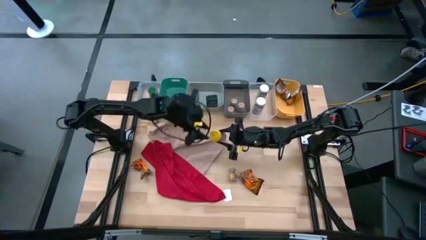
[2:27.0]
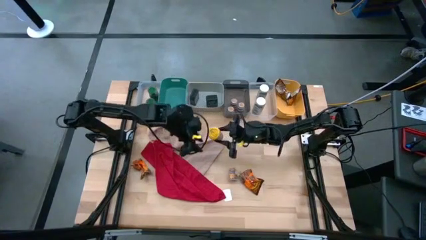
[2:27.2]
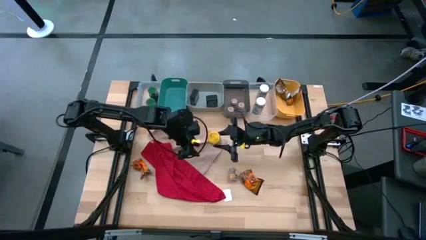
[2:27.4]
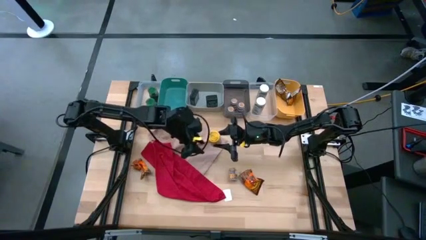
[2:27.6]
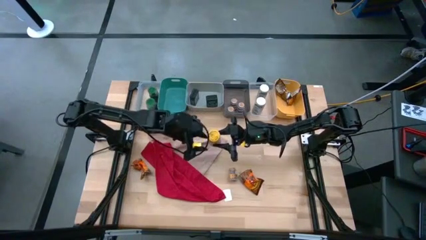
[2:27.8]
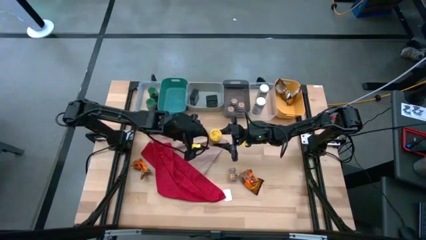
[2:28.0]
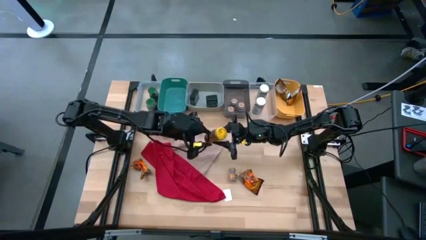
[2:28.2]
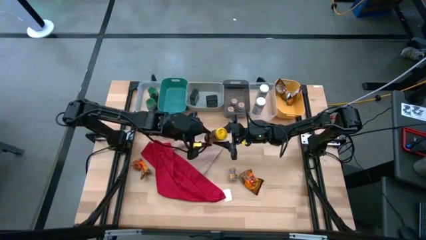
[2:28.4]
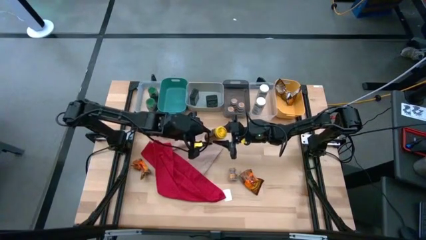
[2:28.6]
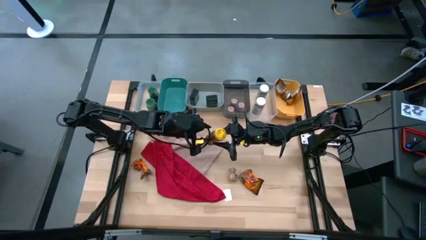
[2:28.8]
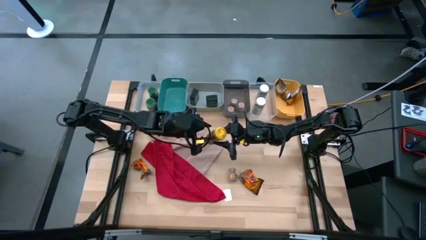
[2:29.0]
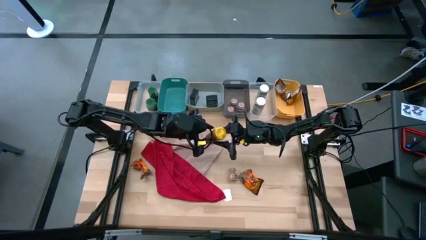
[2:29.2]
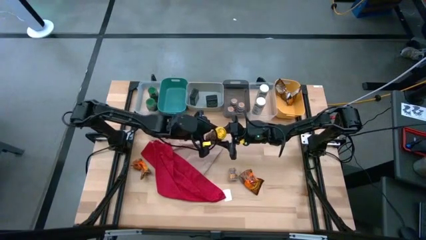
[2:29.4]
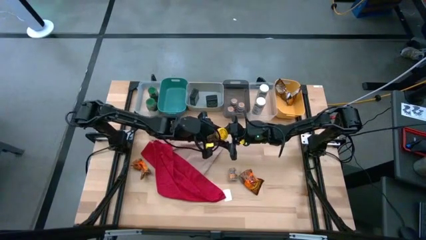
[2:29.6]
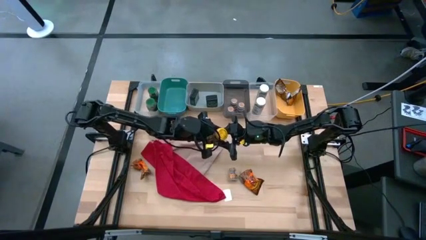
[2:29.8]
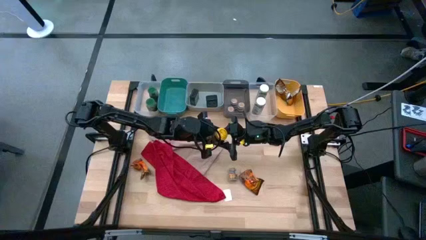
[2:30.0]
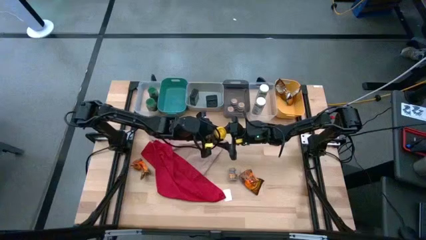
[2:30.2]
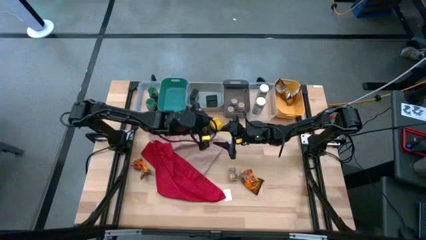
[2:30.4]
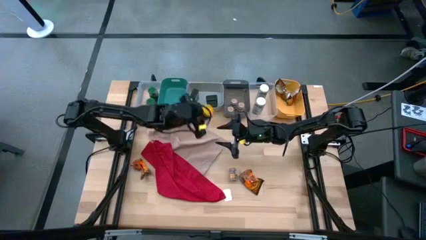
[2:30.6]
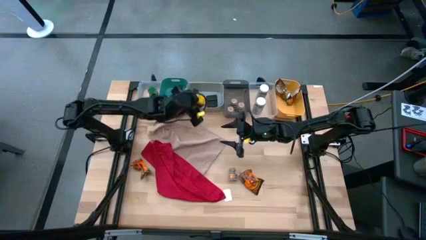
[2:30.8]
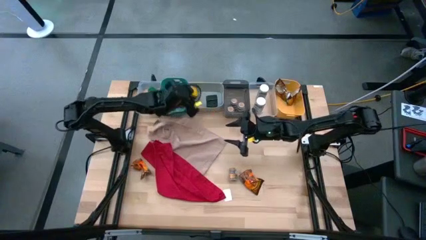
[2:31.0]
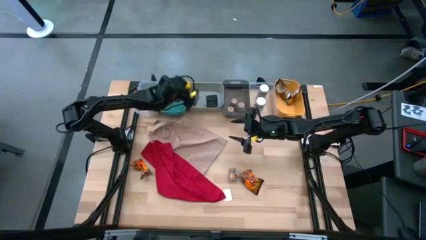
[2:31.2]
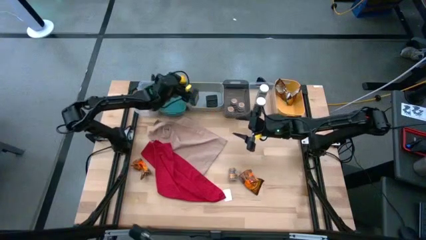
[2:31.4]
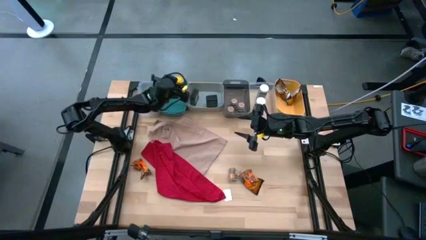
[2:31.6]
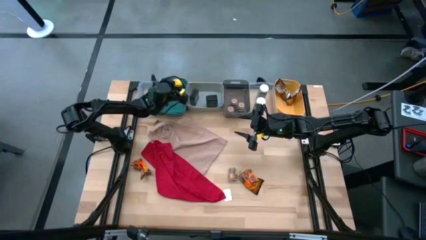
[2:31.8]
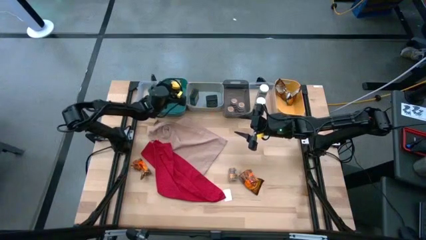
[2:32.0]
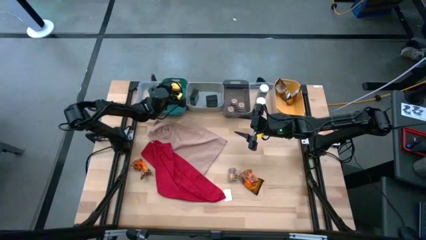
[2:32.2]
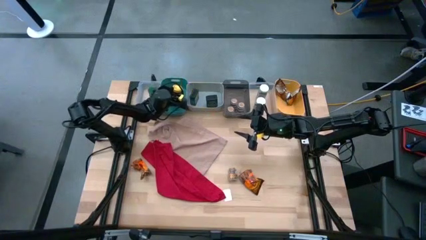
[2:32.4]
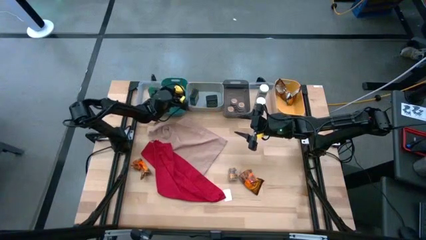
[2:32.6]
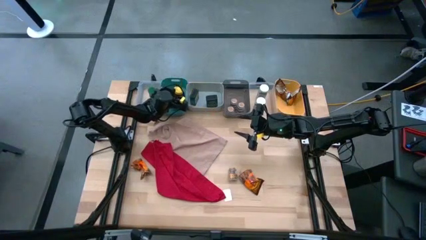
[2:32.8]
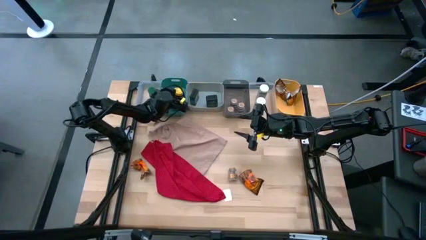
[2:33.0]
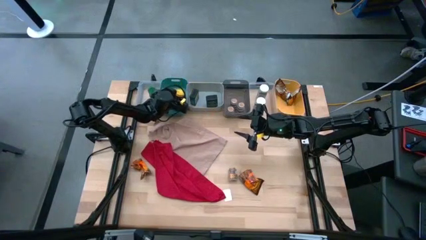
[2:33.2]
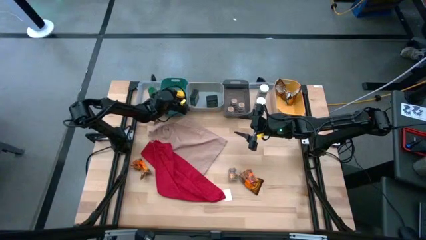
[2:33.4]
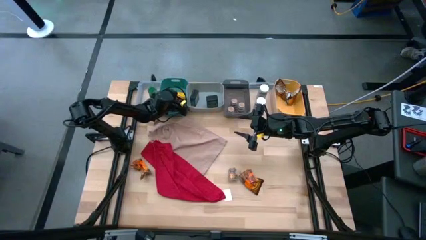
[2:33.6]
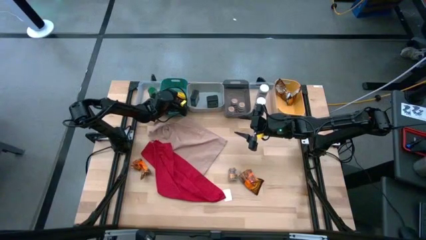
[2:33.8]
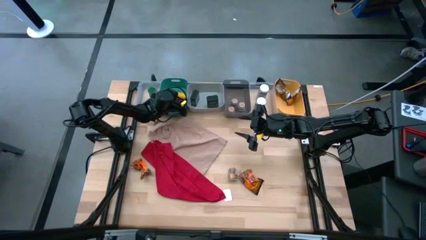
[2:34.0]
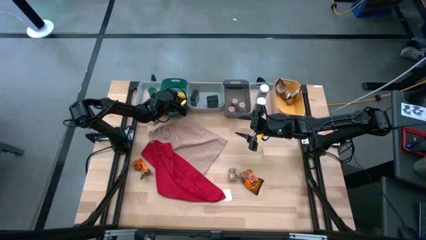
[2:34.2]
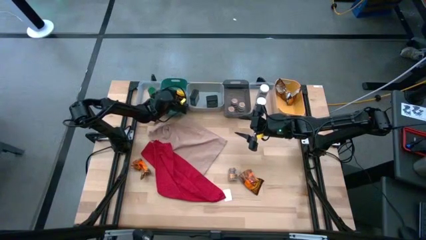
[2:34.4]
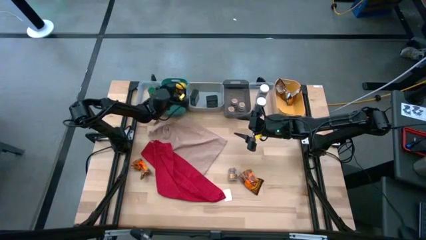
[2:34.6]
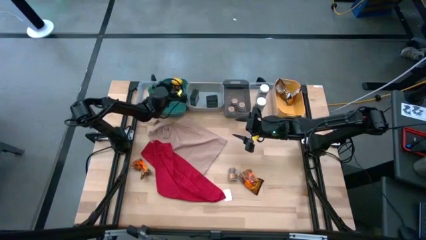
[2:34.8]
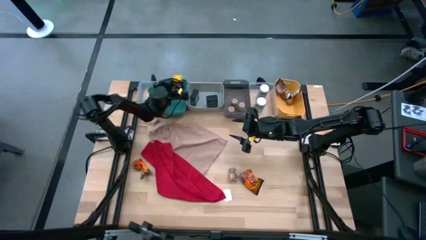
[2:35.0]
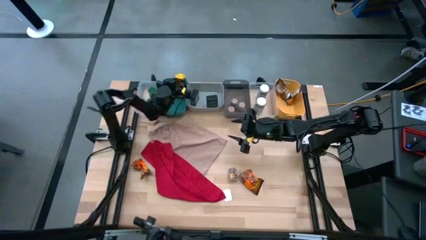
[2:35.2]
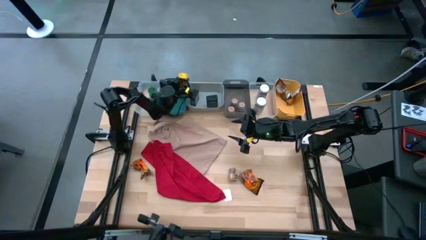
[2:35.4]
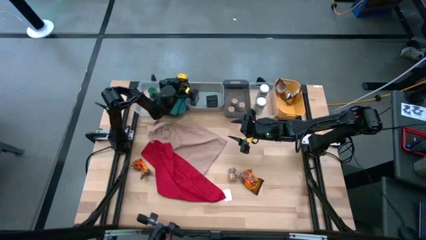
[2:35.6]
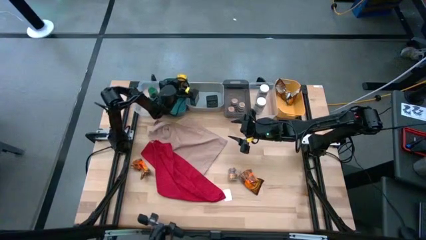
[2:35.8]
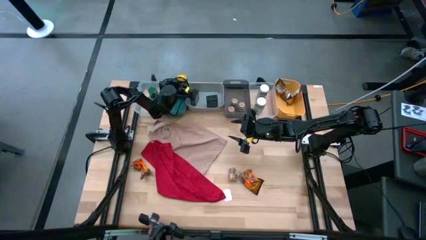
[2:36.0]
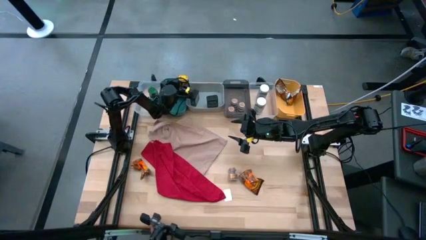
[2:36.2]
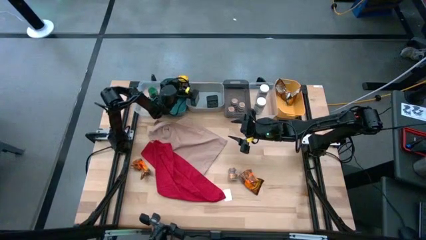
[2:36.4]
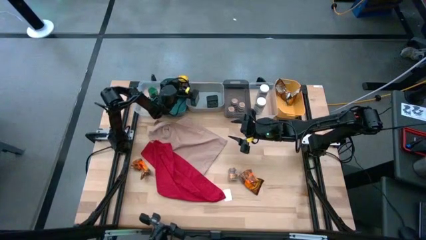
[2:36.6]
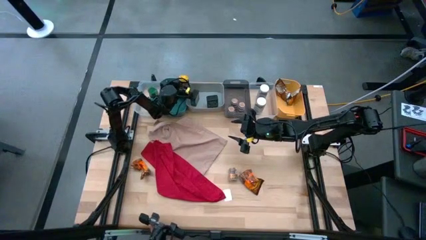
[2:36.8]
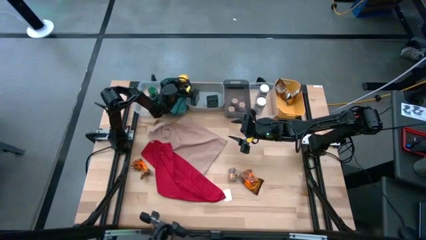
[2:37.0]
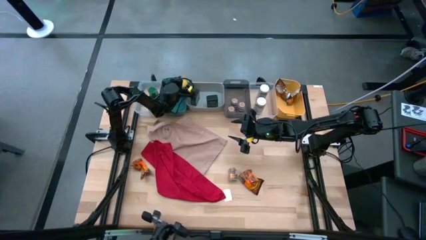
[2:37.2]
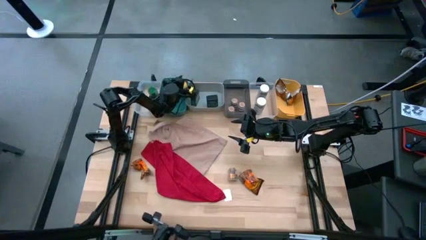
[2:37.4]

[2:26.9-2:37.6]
Task: Sort spices by type
Put the yellow seasoning bottle into the green bin

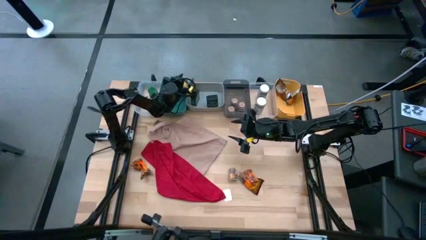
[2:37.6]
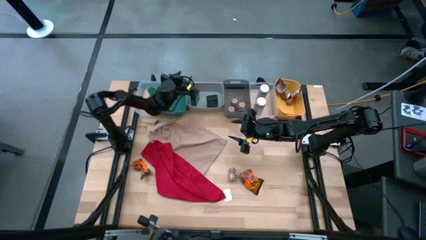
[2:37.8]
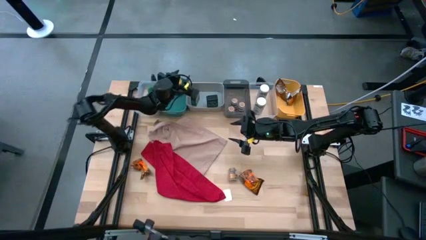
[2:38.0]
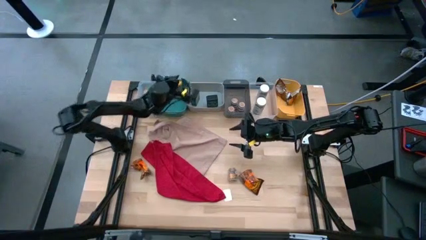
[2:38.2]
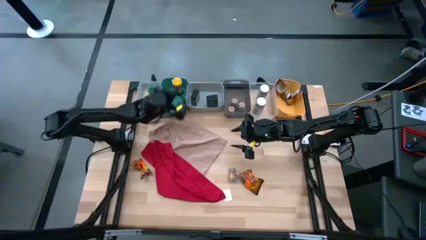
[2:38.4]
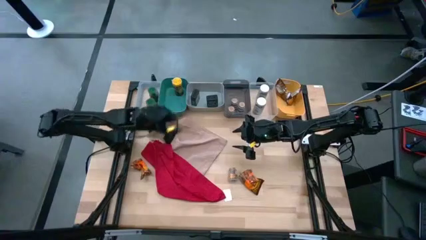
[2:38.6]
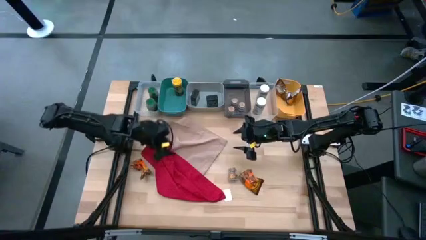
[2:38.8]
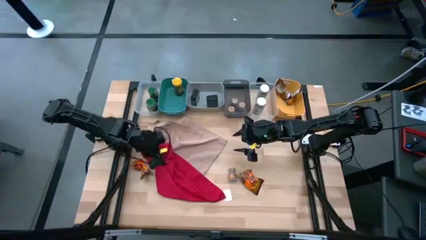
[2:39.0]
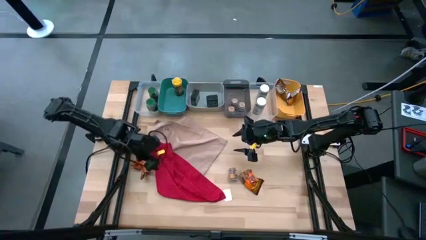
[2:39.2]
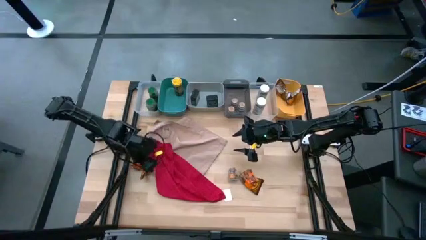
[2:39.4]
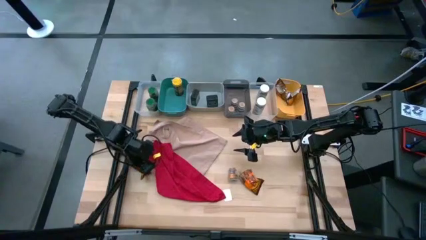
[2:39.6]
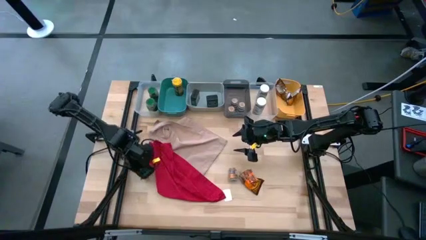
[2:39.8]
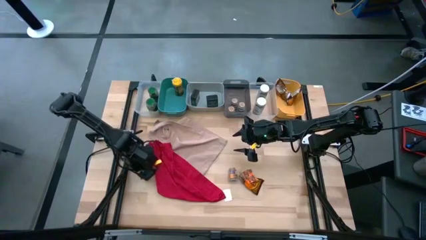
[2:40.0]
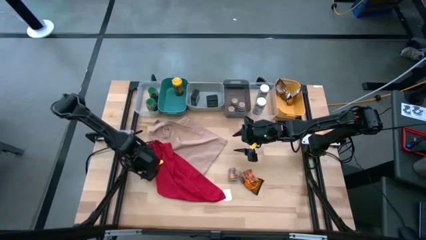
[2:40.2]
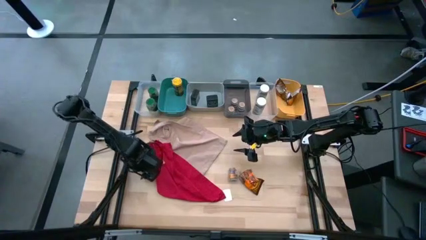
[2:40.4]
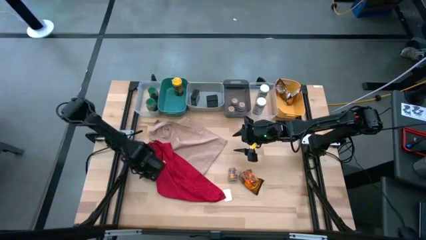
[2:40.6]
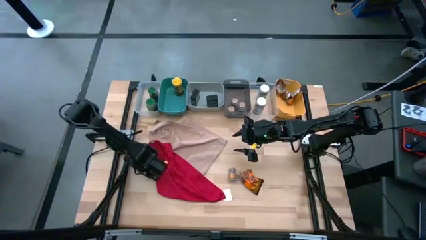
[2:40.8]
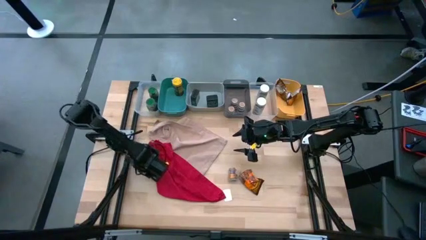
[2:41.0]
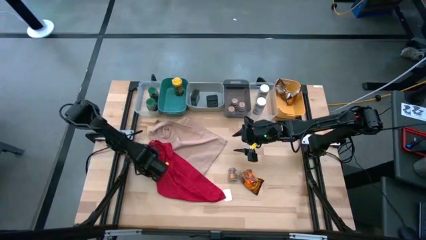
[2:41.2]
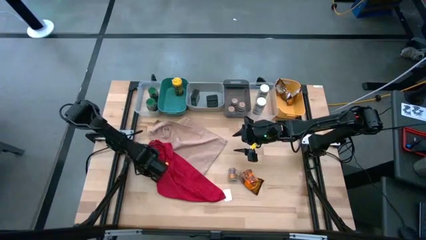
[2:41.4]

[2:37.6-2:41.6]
Put the orange seasoning bag into the yellow bin

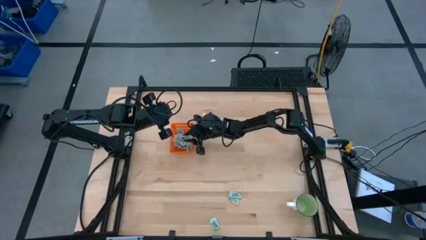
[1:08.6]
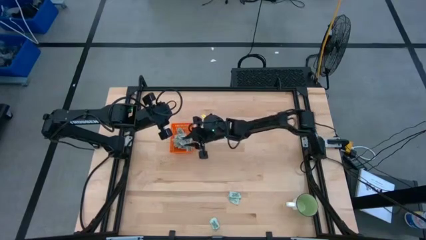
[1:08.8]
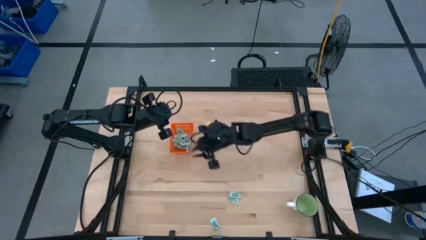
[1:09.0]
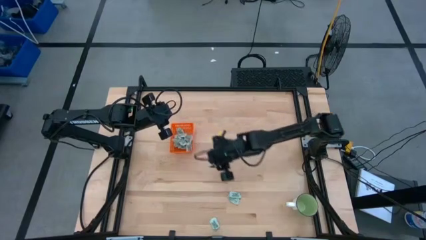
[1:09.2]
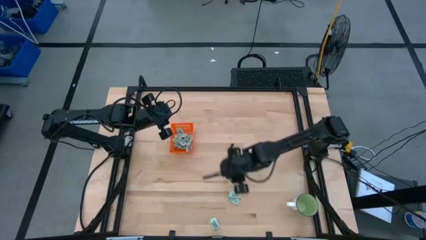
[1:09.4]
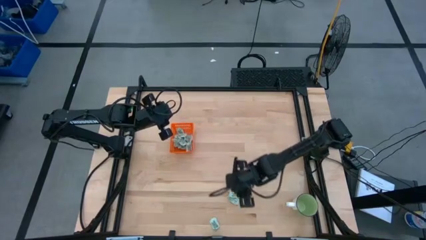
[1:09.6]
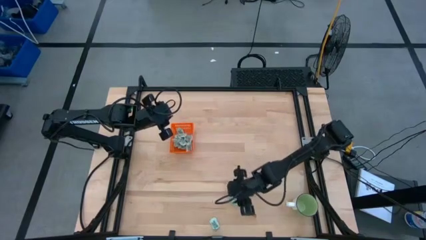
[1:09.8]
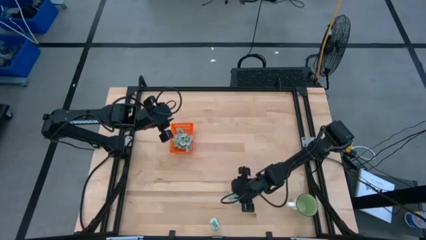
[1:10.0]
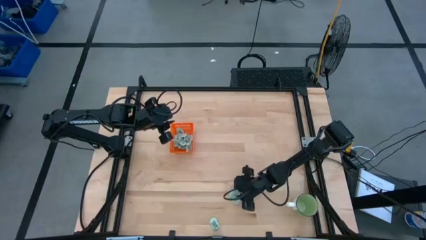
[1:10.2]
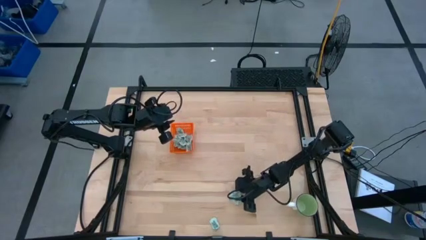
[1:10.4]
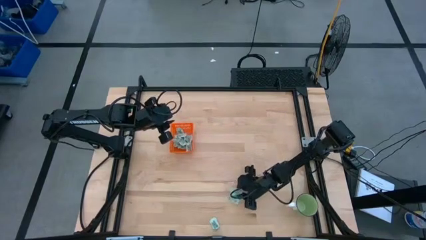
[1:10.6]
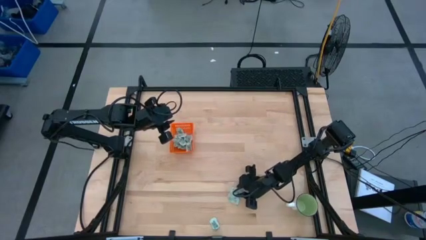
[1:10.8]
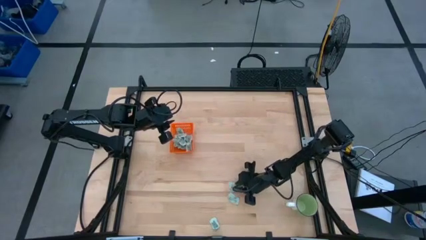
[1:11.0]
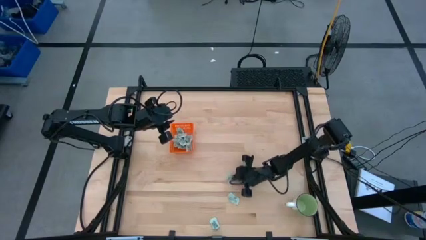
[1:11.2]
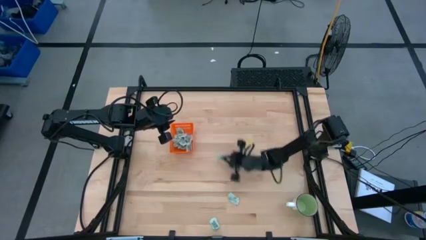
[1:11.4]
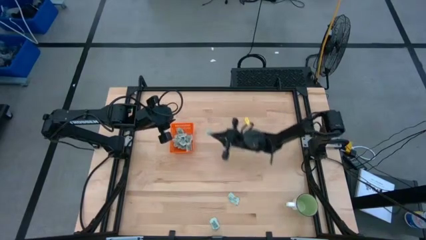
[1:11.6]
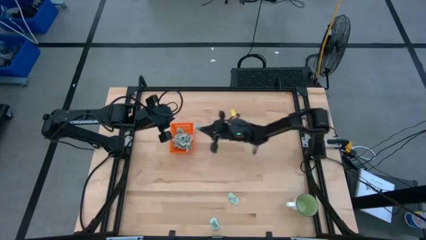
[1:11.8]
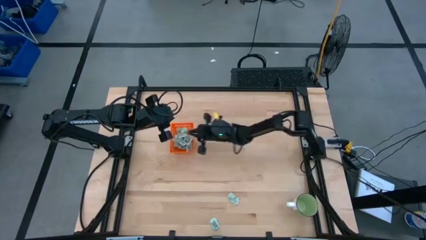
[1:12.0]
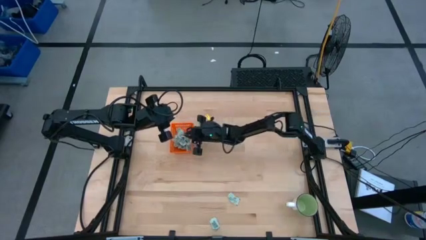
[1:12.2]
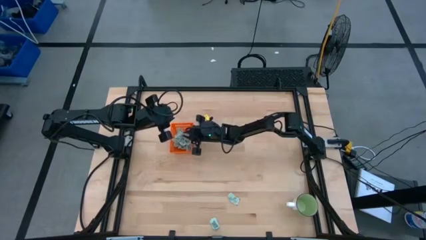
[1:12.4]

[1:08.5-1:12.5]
Task: Pick and place Stevia / Truvia into bins
Put the top green stevia packet into the orange bin
